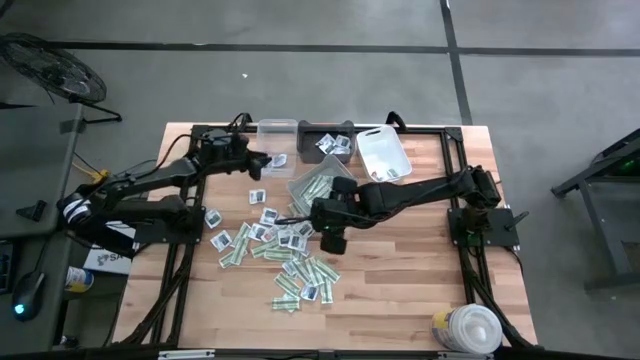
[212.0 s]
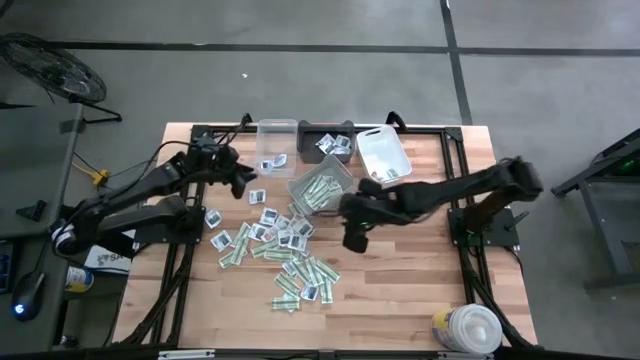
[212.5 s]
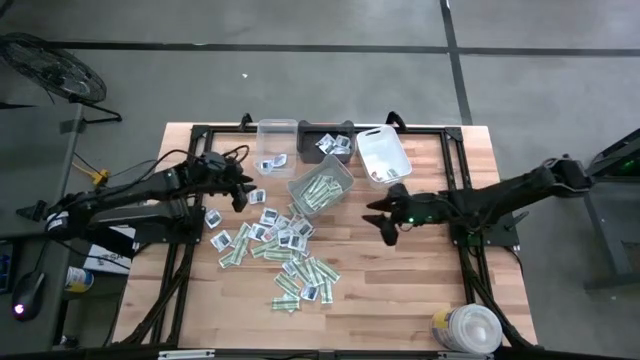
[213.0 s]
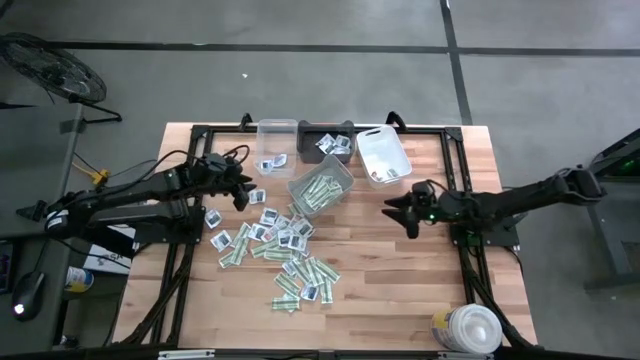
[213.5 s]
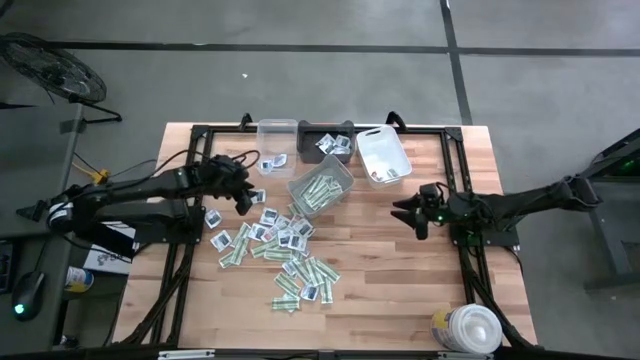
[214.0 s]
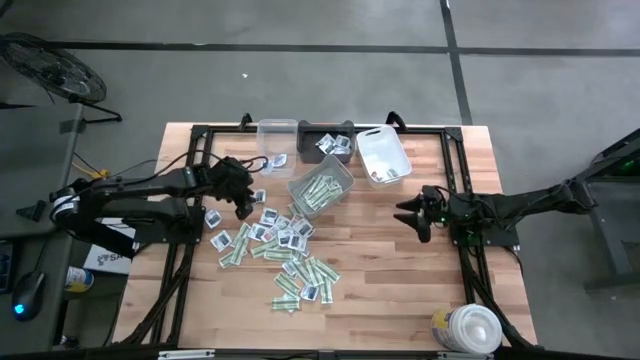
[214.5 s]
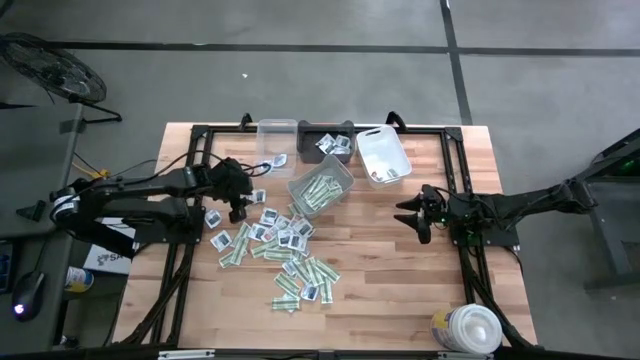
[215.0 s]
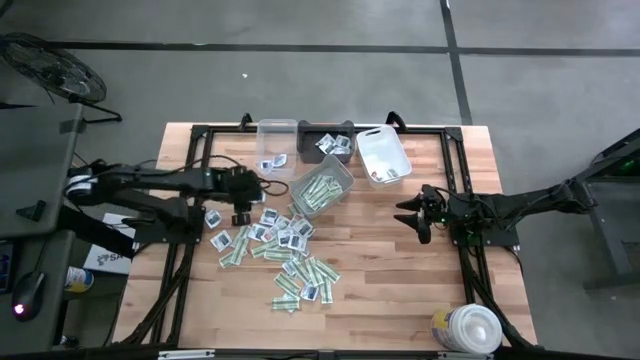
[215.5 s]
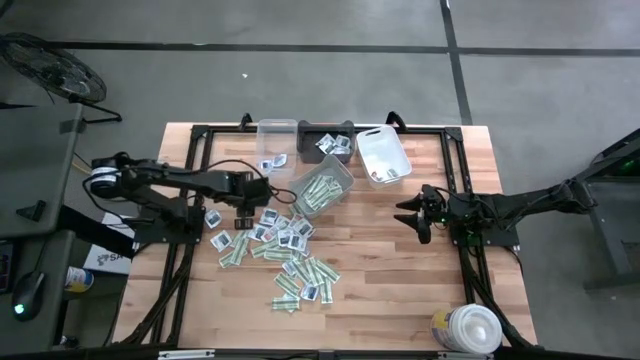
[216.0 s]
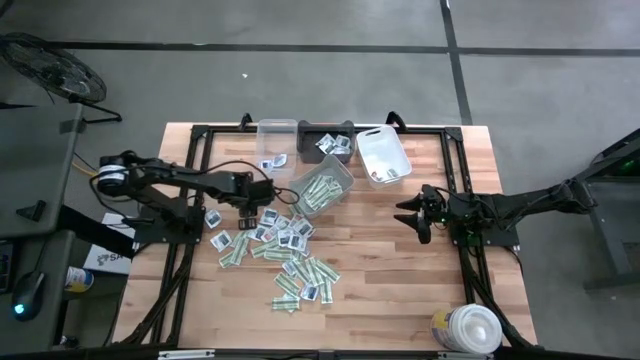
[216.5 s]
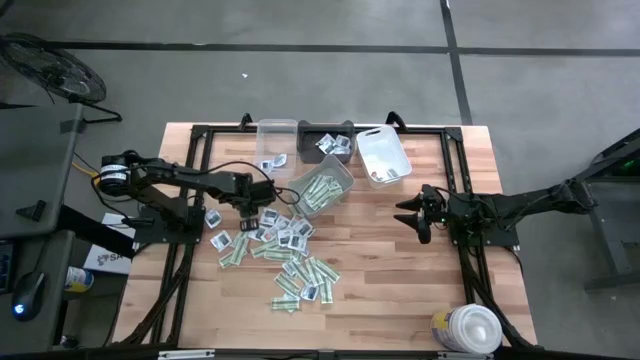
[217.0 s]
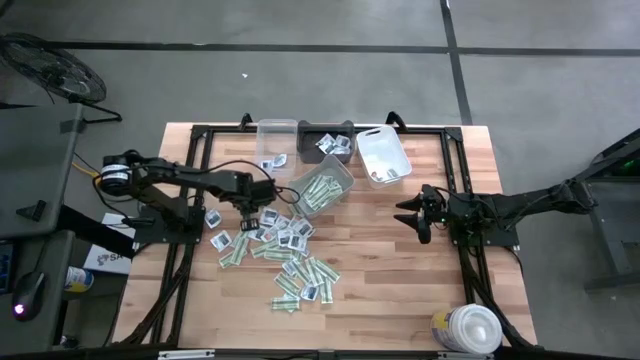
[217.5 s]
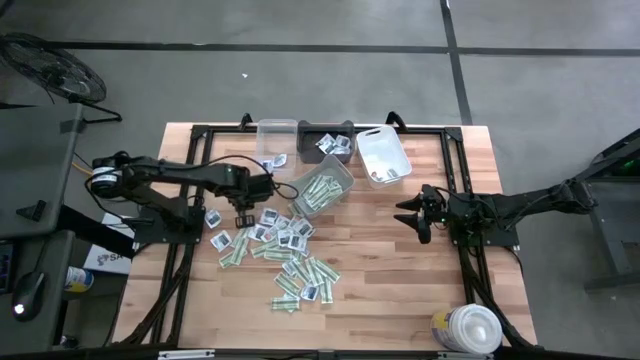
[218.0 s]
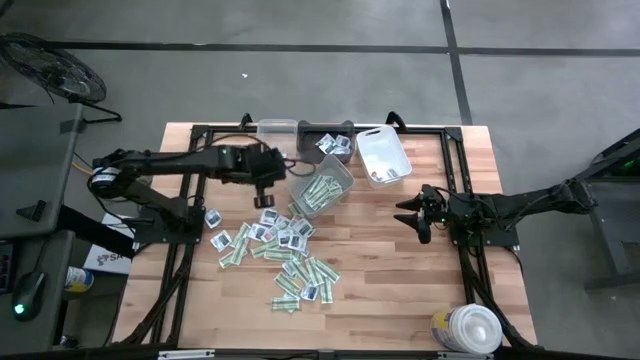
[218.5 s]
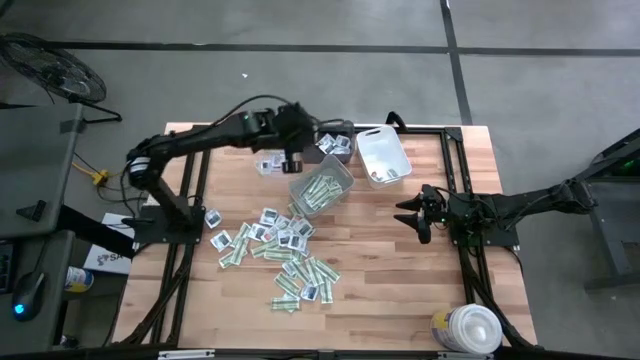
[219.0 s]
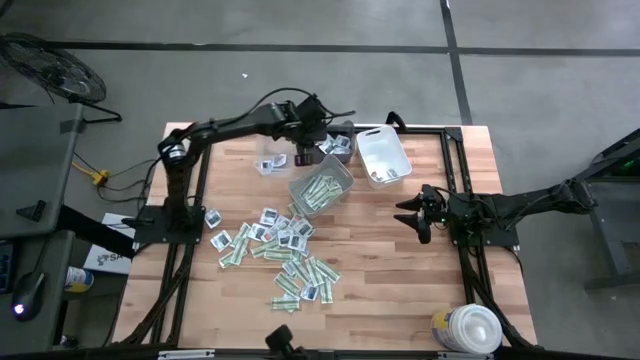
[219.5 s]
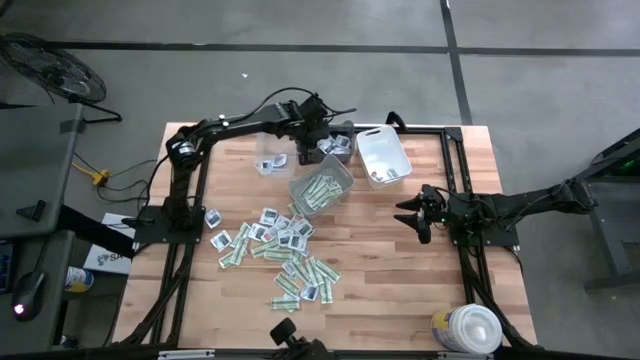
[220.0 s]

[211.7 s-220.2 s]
Task: Pick & Place First Aid Supplies
Put the towelette pack into the black bin

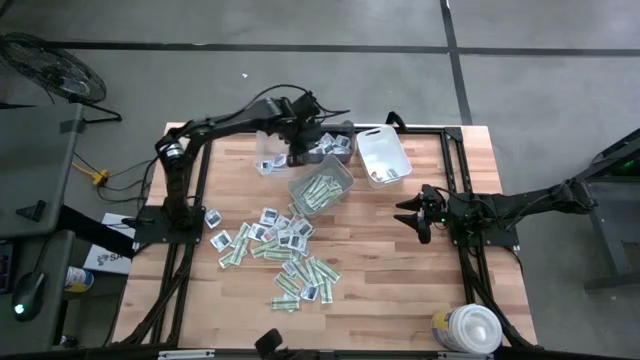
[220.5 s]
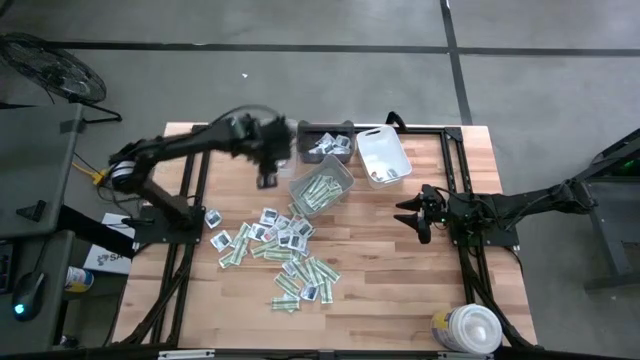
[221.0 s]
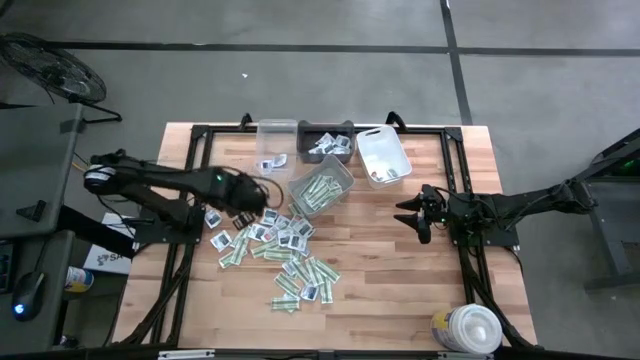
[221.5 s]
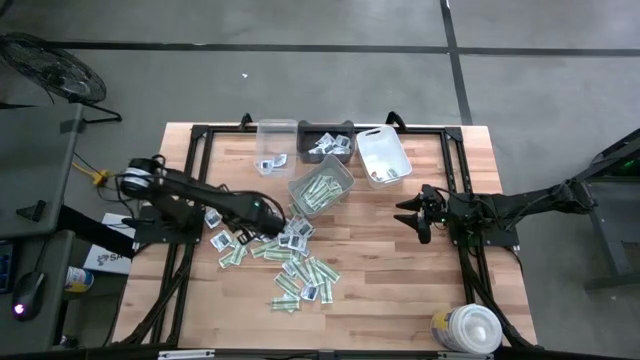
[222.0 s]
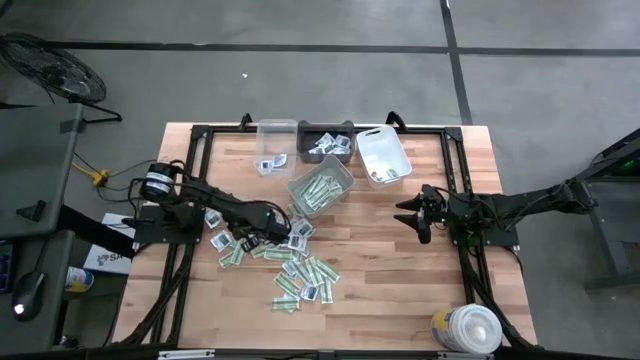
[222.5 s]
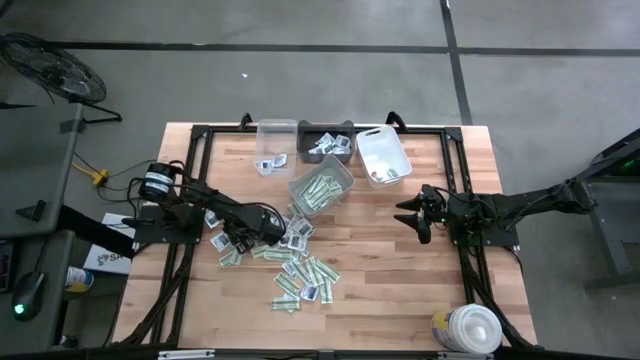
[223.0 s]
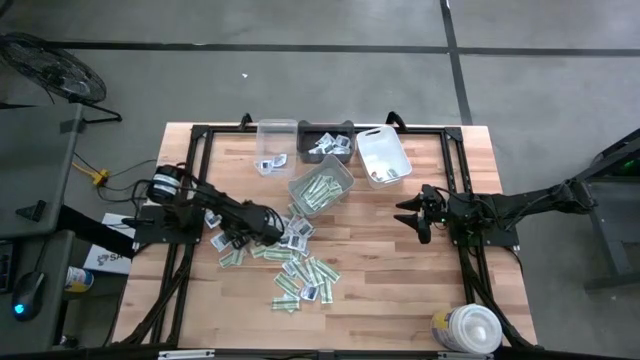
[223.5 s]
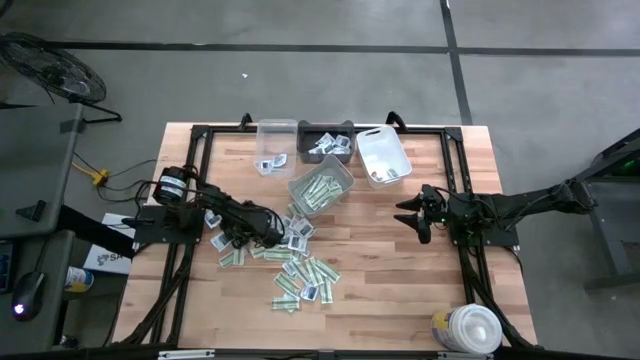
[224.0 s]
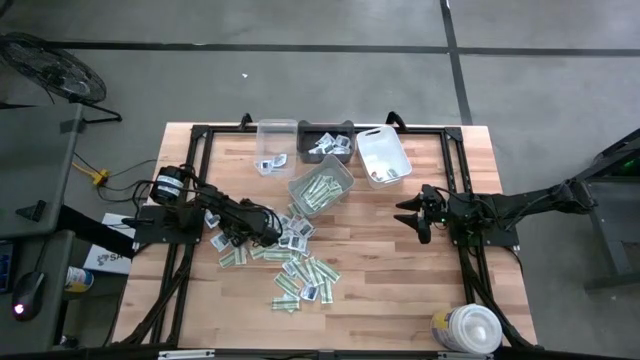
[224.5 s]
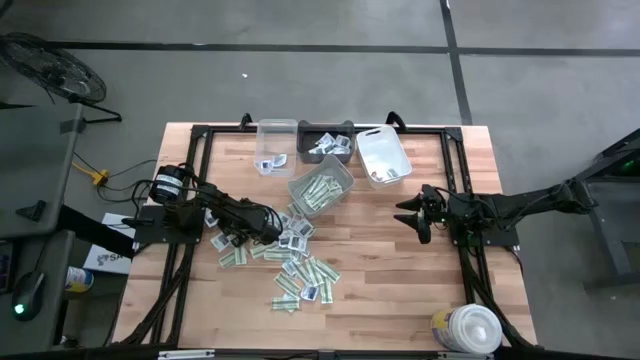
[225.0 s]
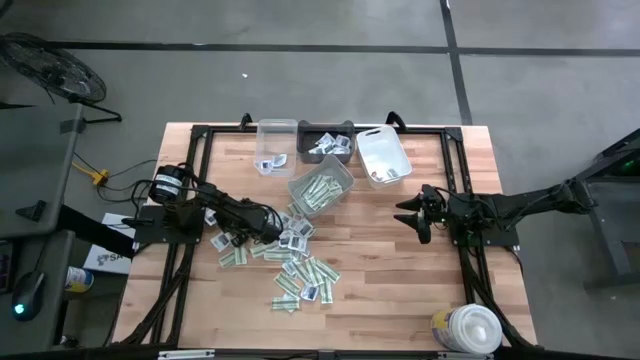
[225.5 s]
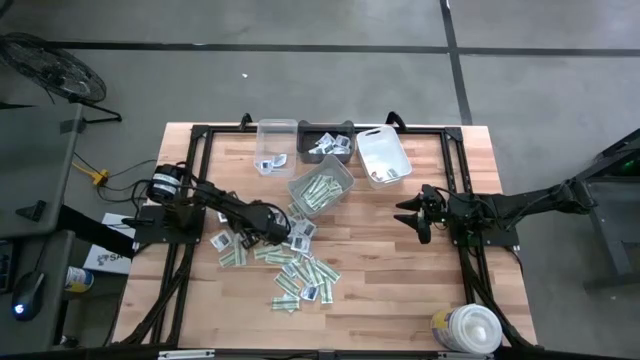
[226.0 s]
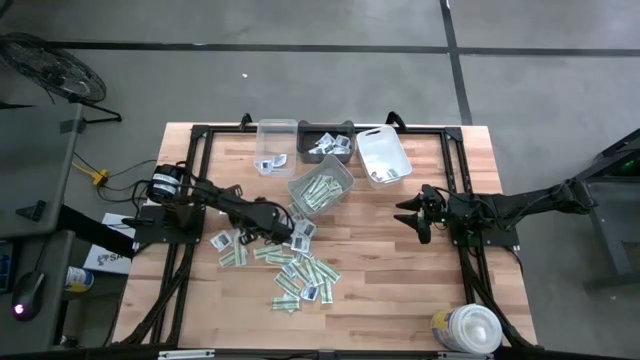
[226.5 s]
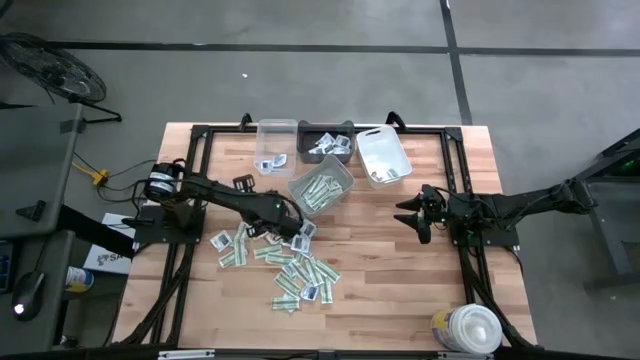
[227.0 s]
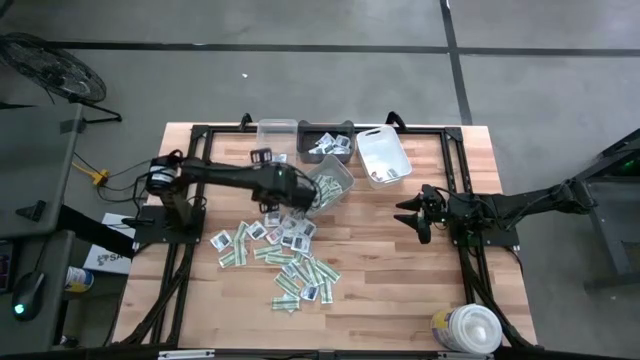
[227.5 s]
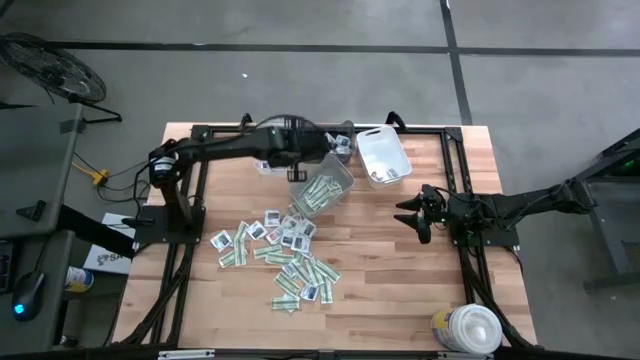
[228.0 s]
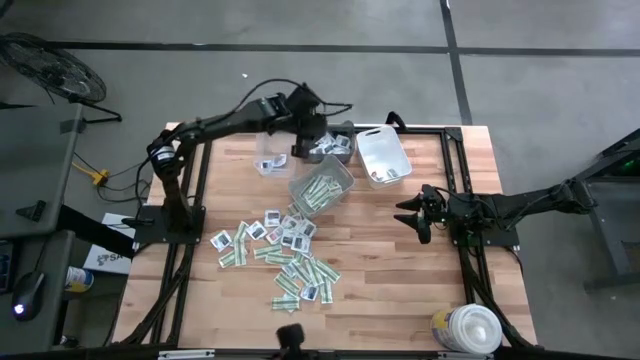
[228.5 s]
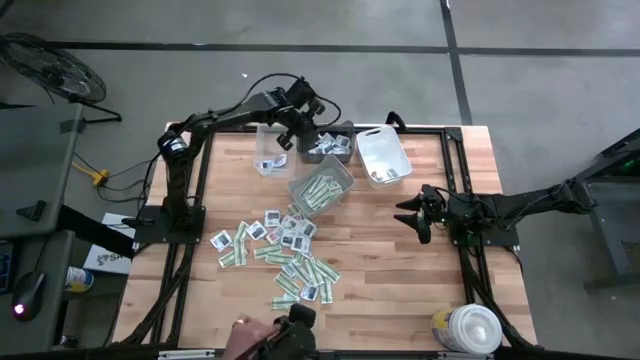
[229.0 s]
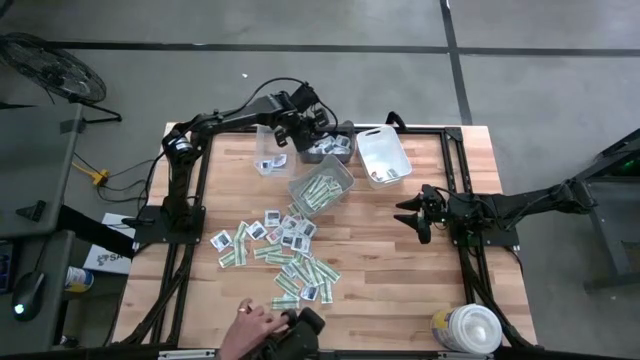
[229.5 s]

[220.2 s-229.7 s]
Put the towelette pack into the black bin

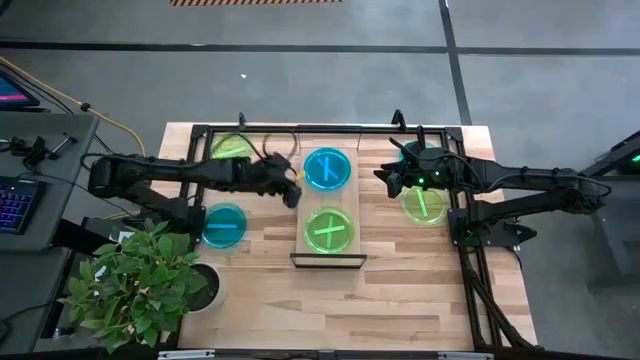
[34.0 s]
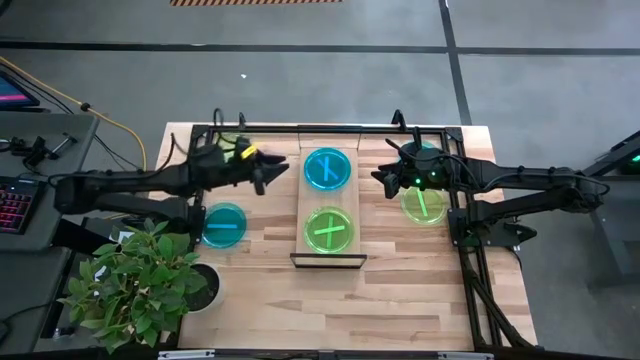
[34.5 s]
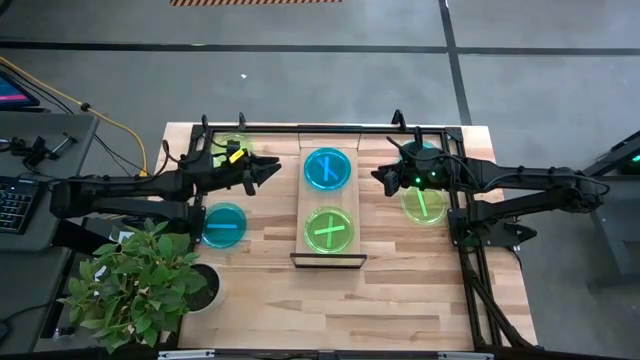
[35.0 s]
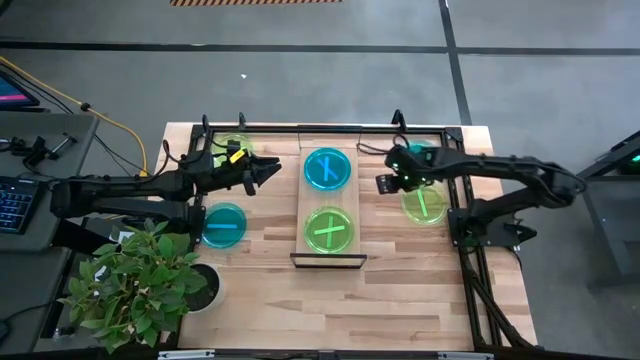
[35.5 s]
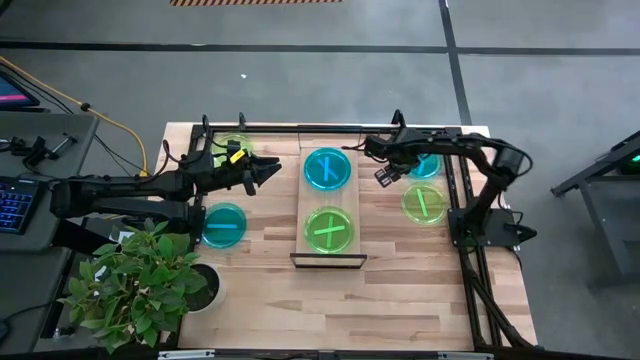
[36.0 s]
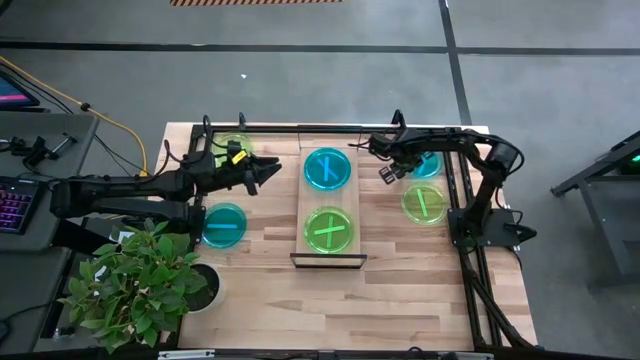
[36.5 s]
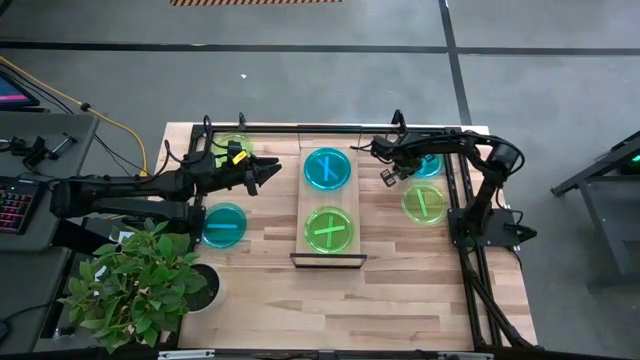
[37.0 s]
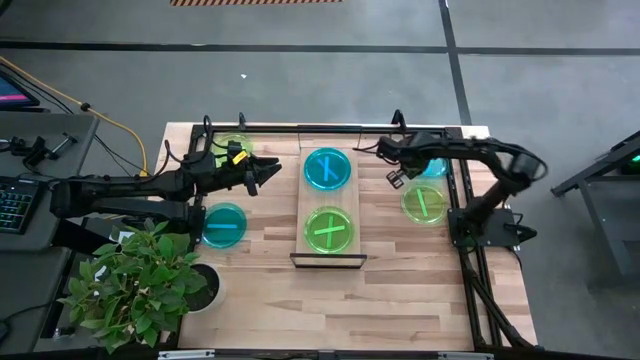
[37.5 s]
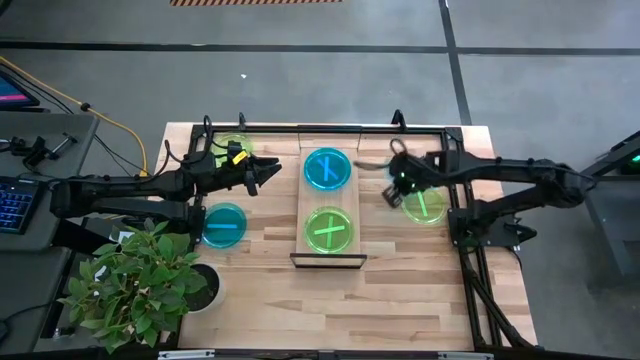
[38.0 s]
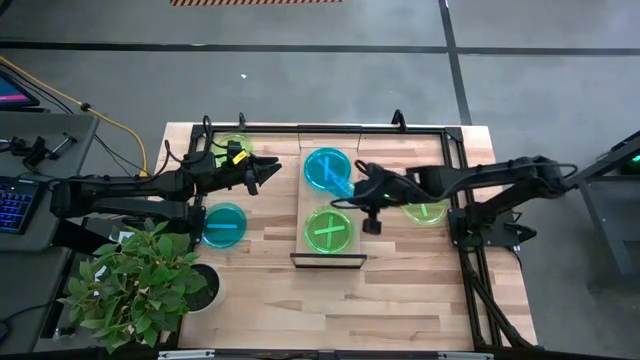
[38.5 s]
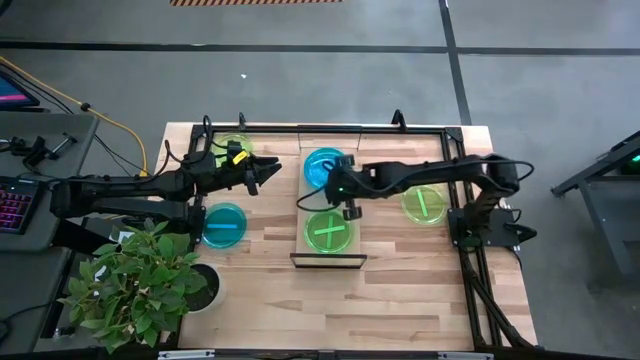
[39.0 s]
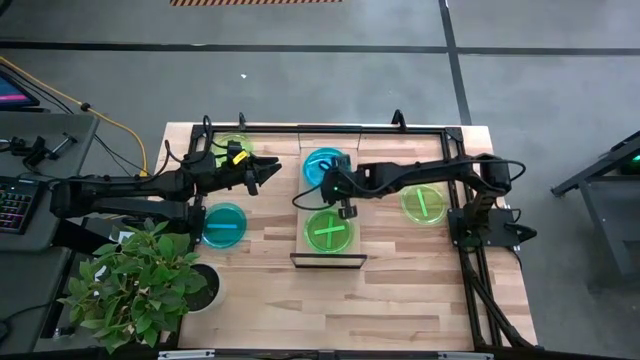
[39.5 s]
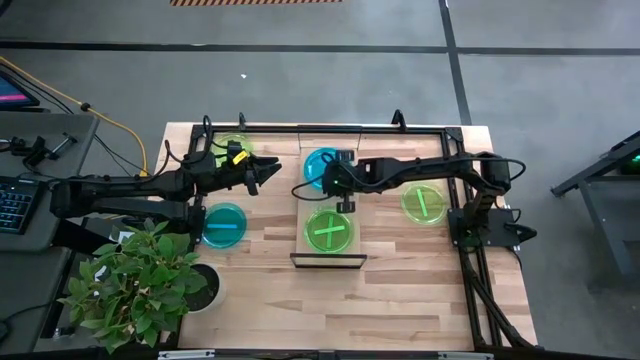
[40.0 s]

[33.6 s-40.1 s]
Task: Place and stack plates onto a shelf
Stack the blue plate on top of the blue plate on the shelf
